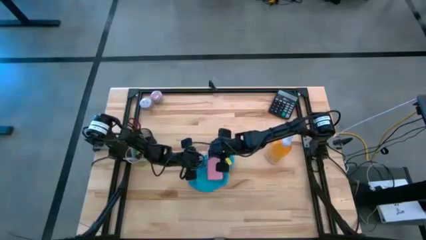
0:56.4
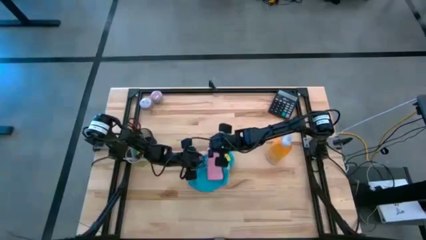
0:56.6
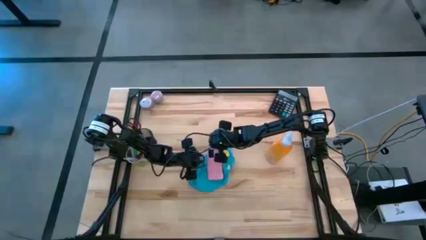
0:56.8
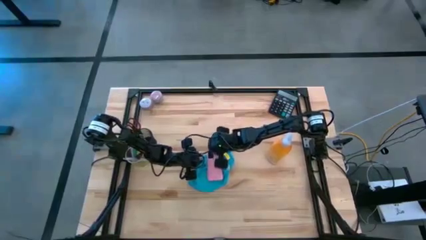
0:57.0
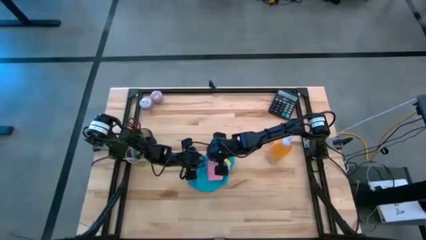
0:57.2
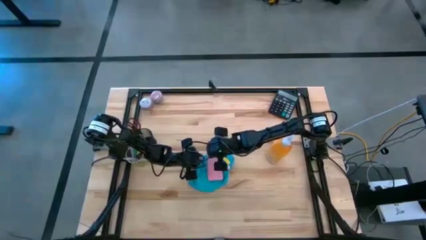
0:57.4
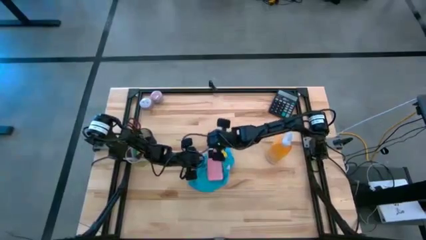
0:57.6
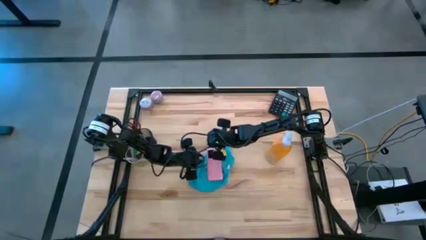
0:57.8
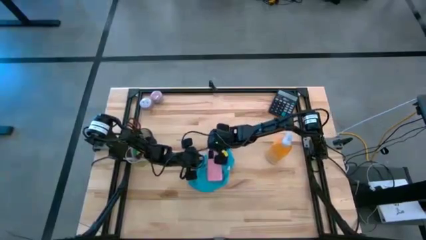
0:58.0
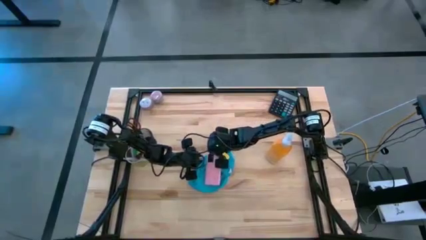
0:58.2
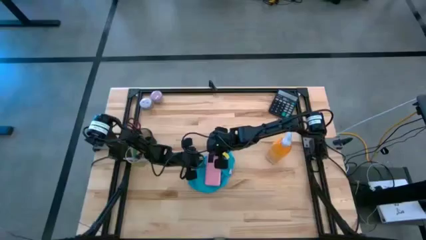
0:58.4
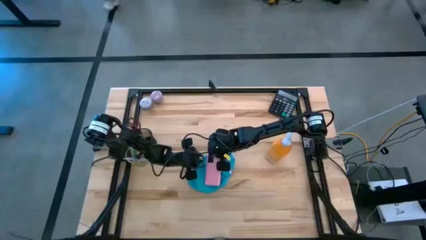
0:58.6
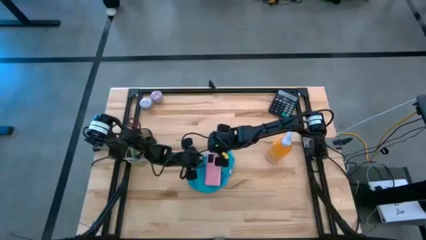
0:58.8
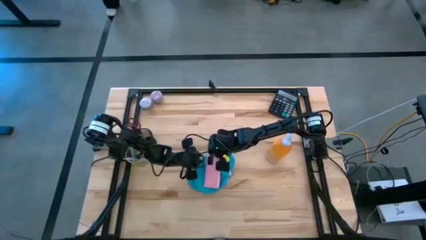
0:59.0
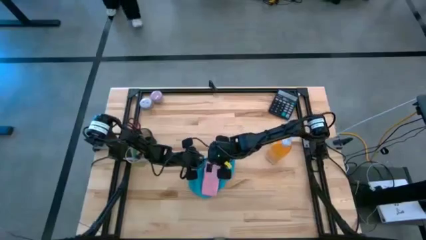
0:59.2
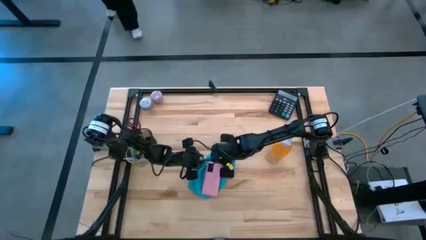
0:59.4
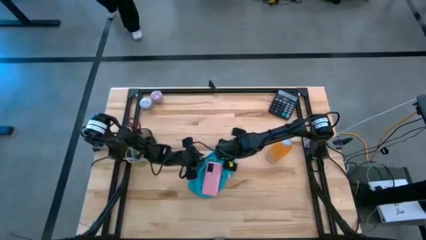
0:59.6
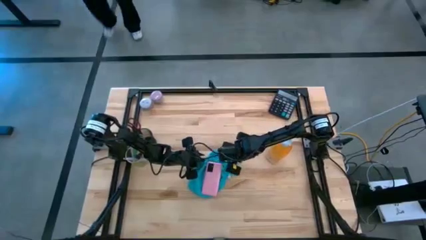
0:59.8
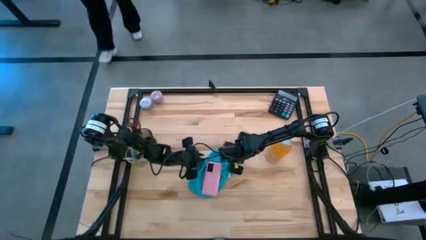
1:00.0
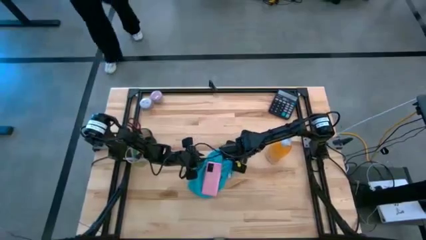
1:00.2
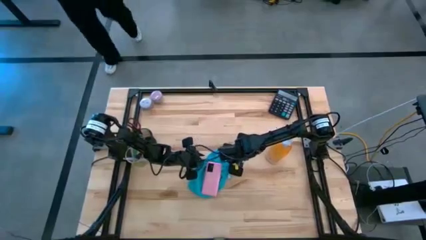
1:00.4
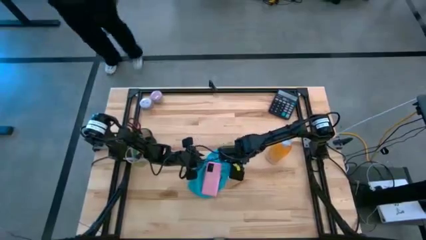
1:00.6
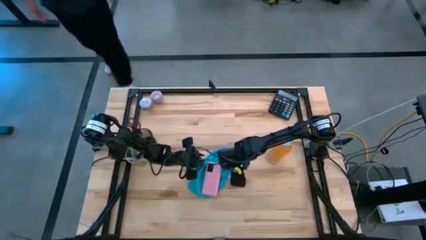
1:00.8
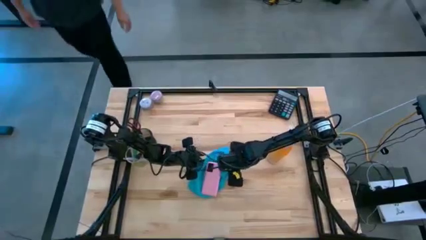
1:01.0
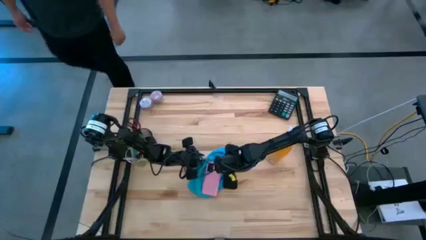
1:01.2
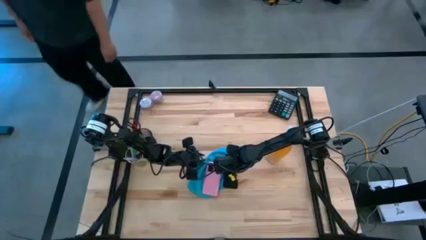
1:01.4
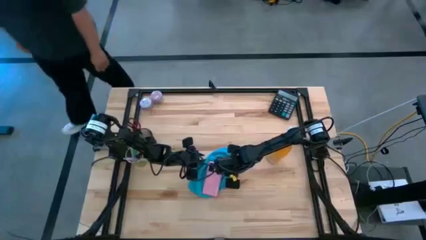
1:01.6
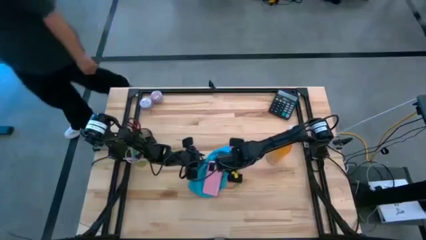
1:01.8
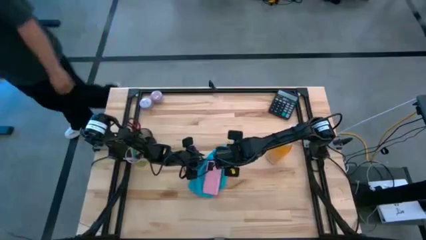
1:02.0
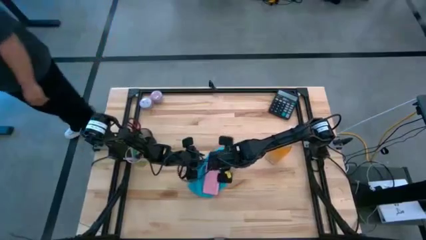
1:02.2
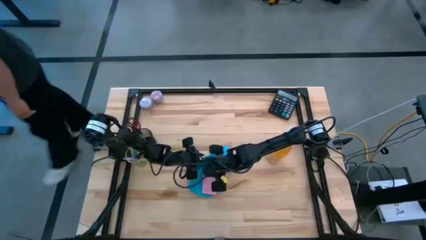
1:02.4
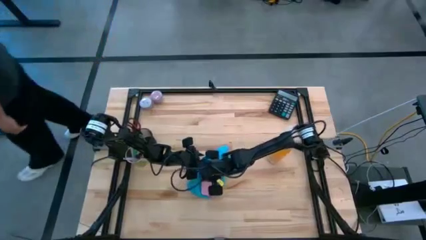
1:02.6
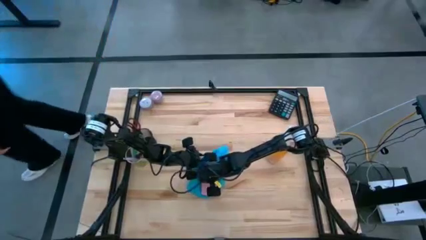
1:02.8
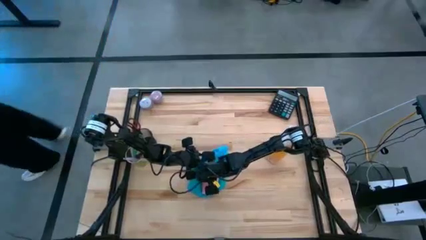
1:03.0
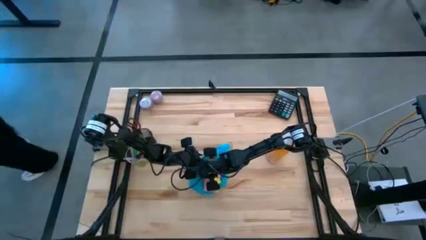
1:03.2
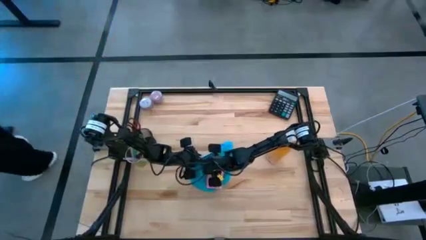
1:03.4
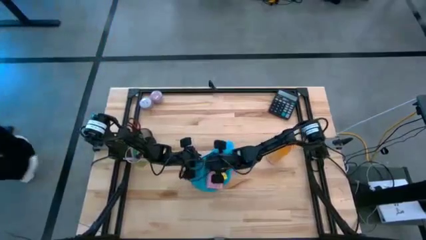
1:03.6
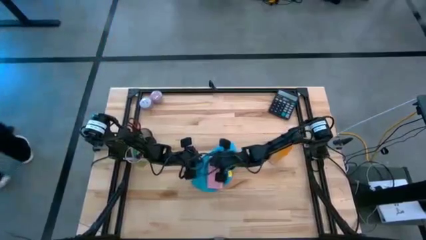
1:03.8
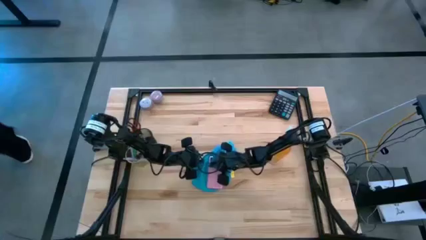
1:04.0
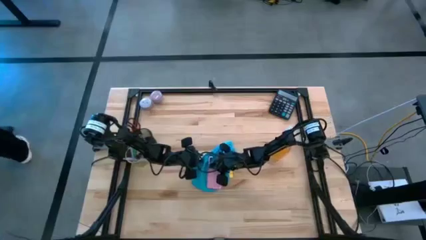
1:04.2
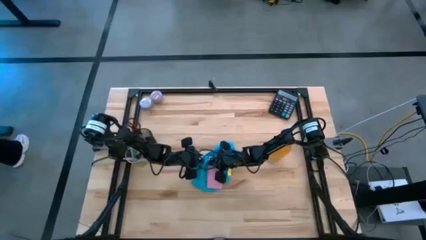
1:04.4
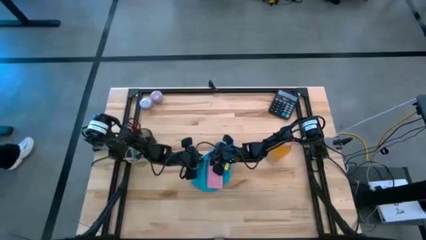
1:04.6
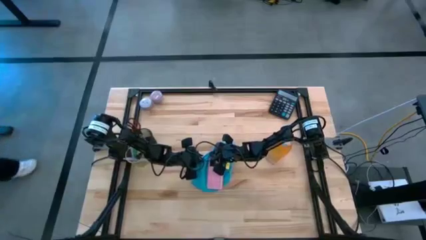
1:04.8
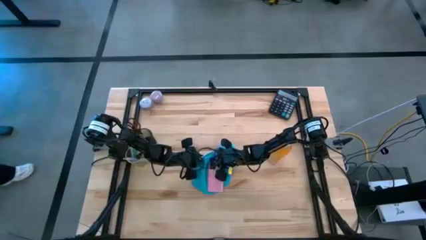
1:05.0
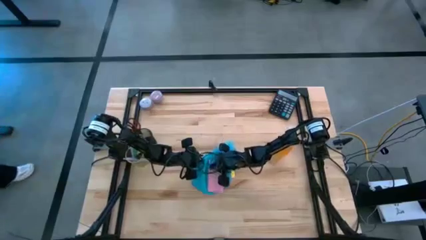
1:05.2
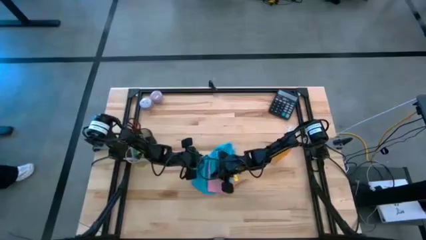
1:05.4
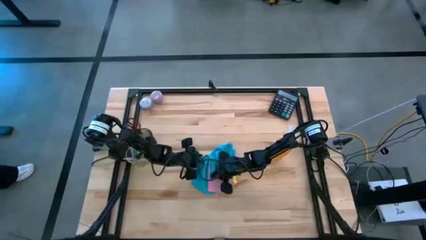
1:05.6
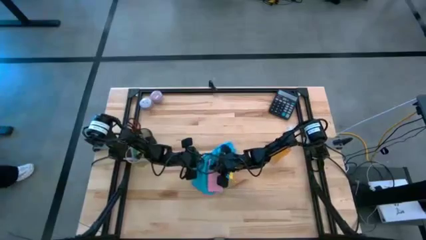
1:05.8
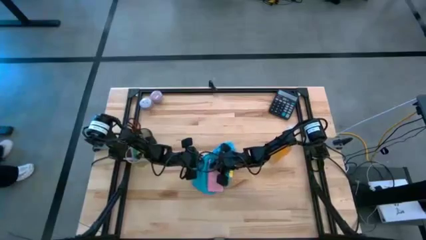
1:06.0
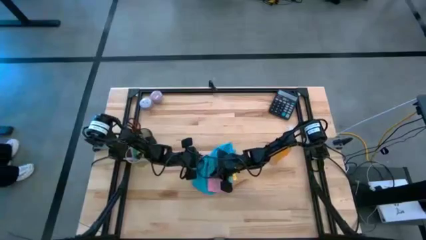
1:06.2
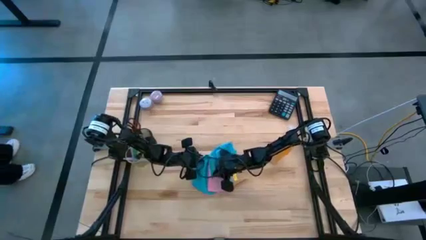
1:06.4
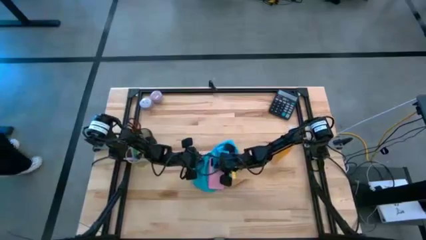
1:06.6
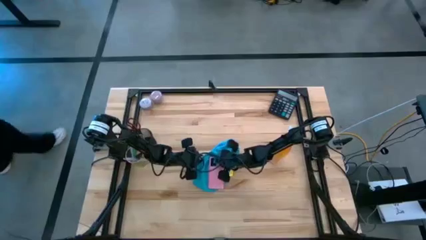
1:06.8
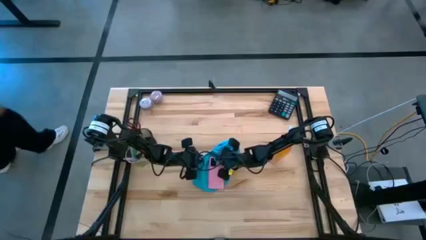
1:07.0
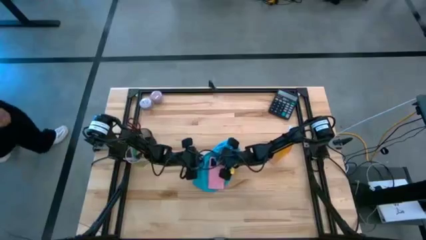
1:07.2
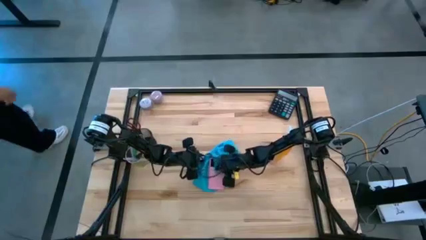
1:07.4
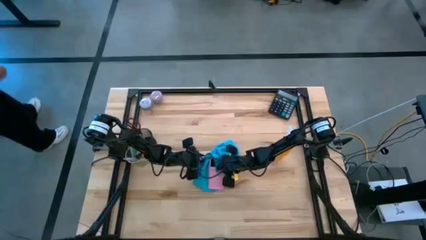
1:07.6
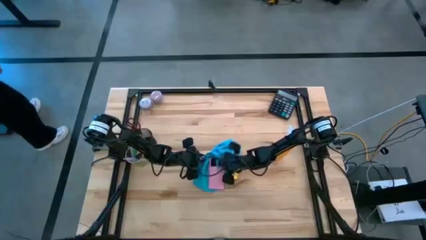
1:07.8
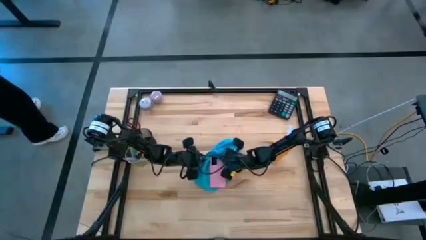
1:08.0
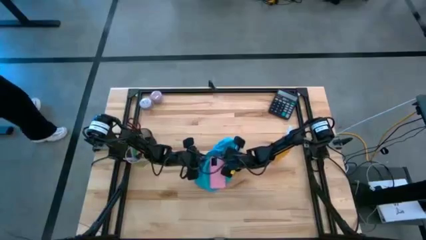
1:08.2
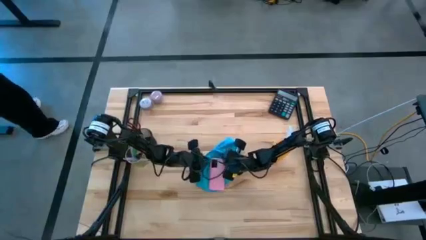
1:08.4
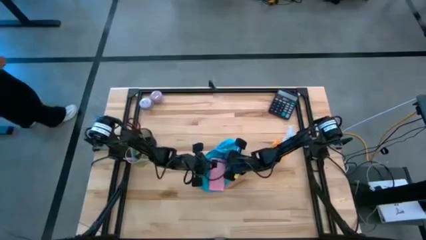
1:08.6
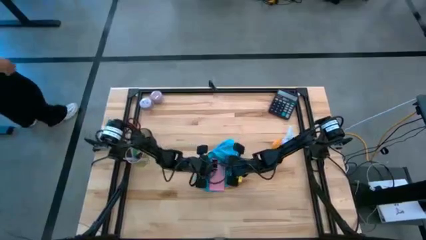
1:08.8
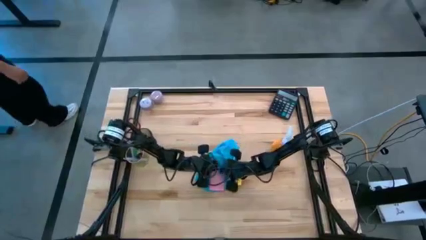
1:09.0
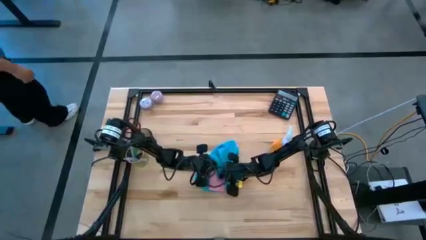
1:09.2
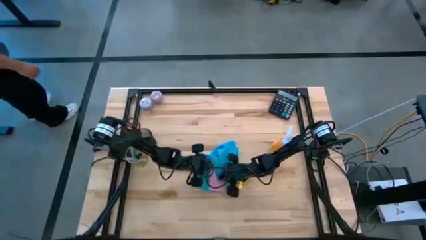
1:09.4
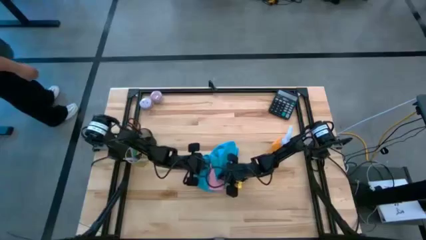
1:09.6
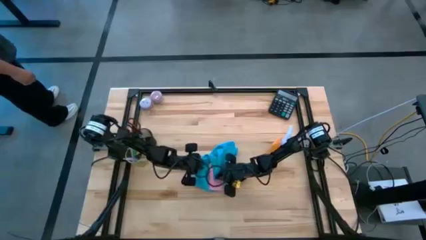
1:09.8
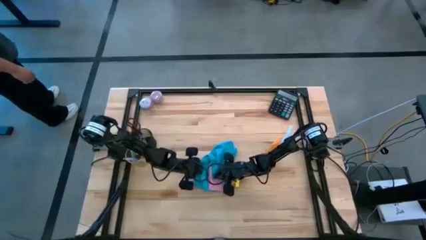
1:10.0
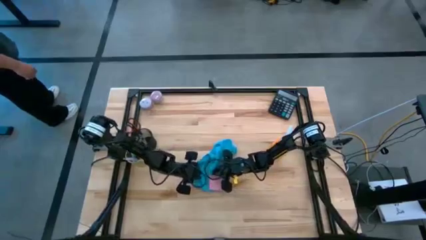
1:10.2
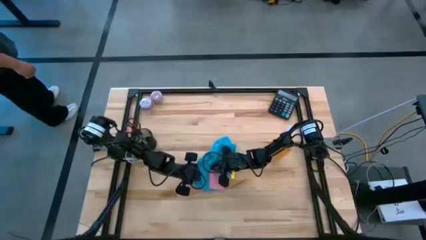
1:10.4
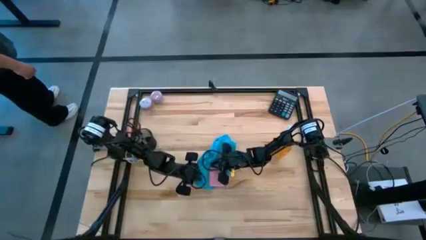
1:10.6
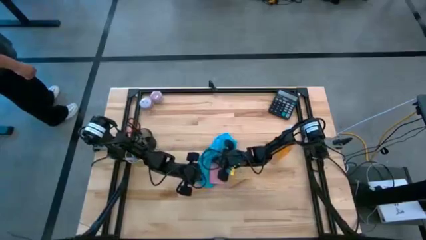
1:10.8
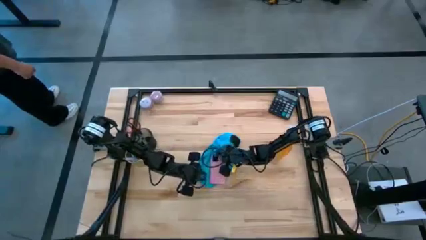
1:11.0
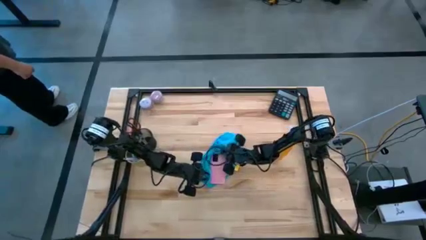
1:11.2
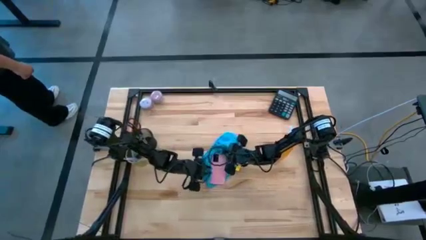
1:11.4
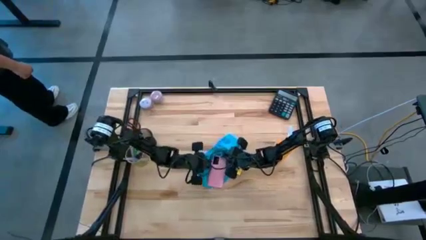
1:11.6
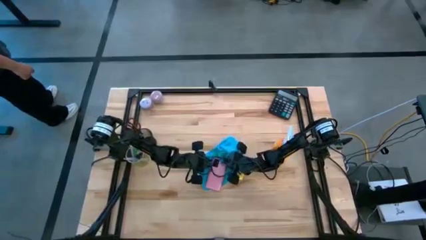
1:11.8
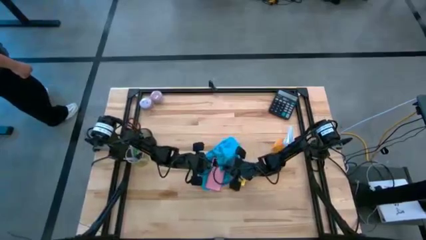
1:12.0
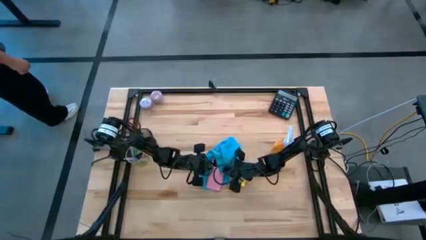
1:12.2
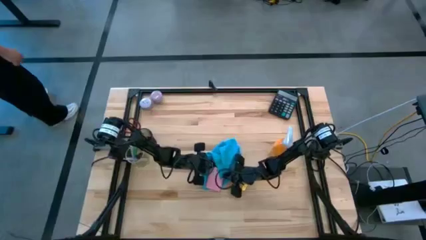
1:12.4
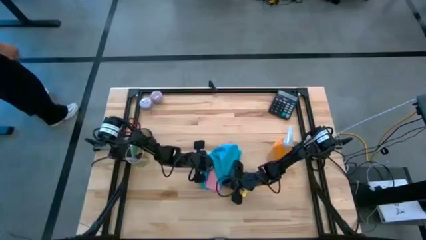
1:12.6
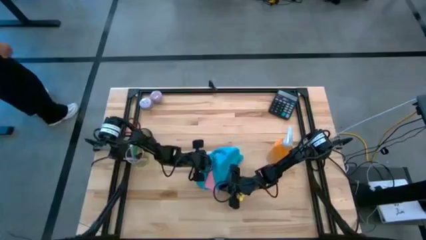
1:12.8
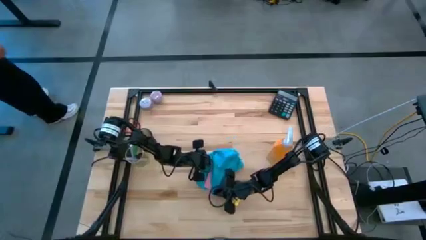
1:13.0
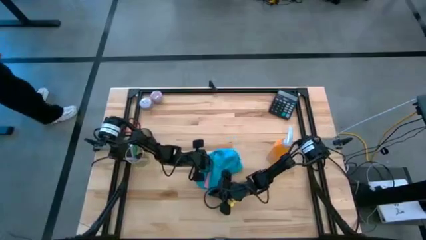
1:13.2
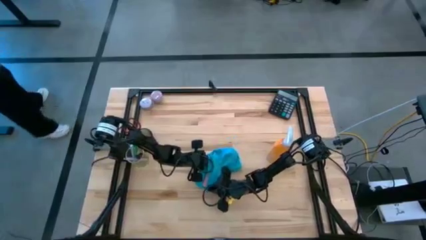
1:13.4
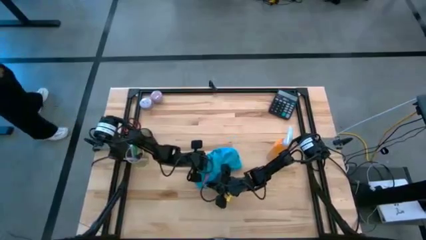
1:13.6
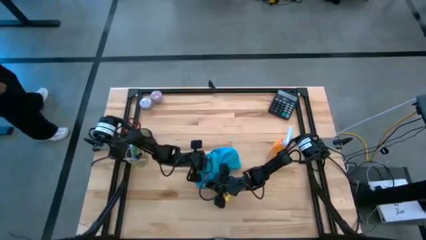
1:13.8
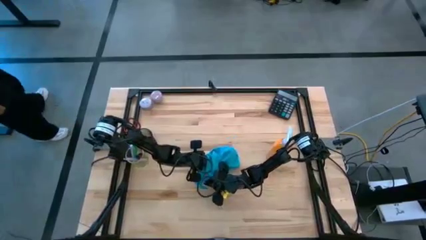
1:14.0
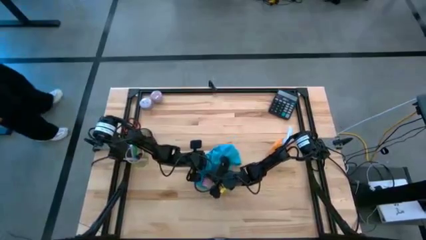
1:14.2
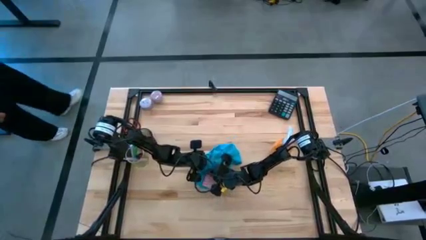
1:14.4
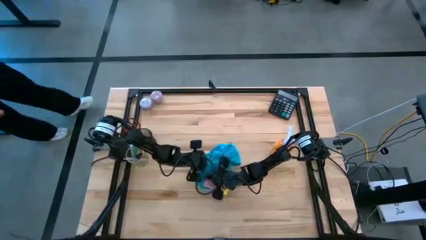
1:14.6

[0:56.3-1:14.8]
Task: Apply microfiber cloth
Wipe the pink cellphone with the blue microfiber cloth
